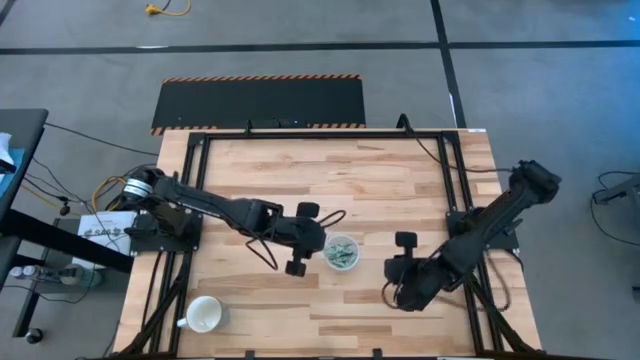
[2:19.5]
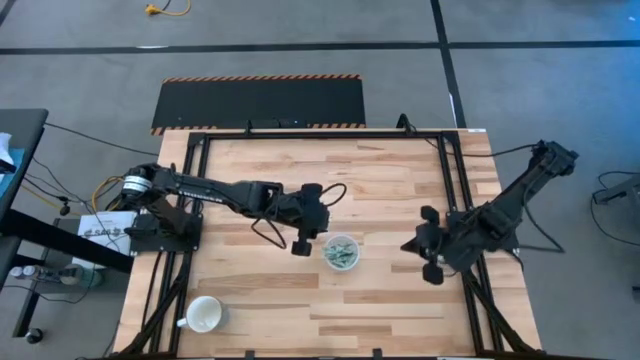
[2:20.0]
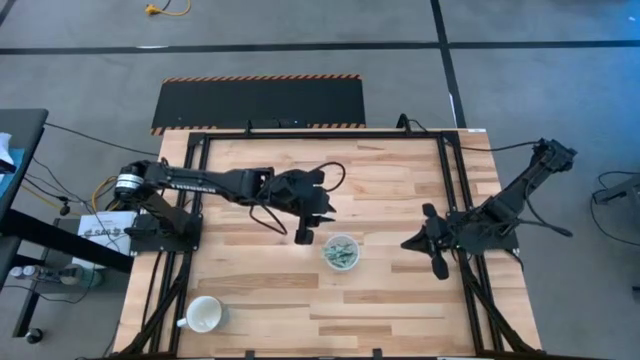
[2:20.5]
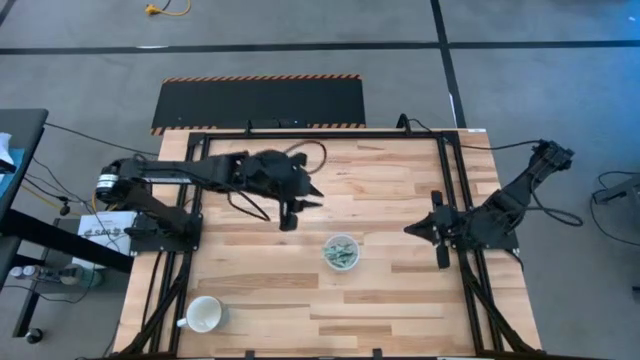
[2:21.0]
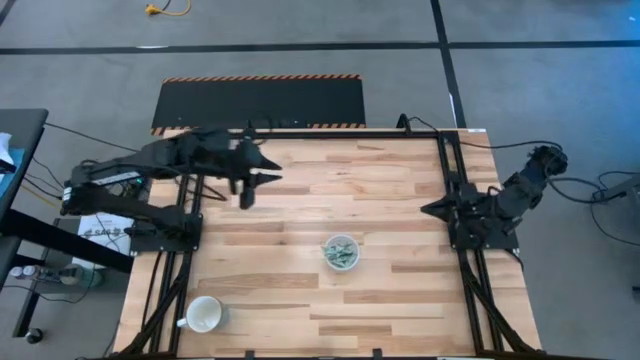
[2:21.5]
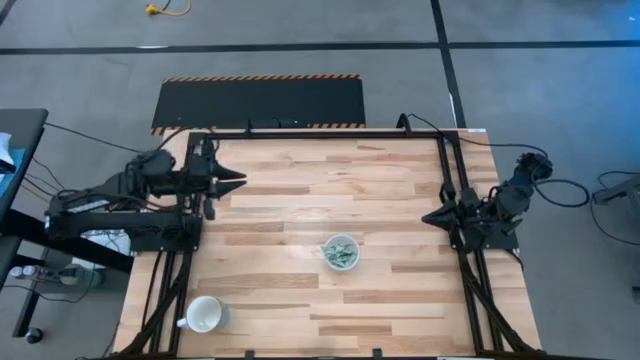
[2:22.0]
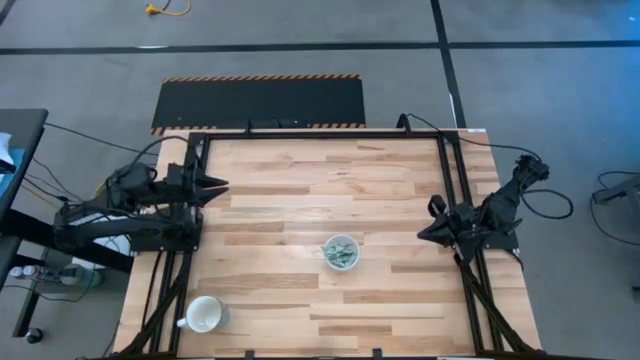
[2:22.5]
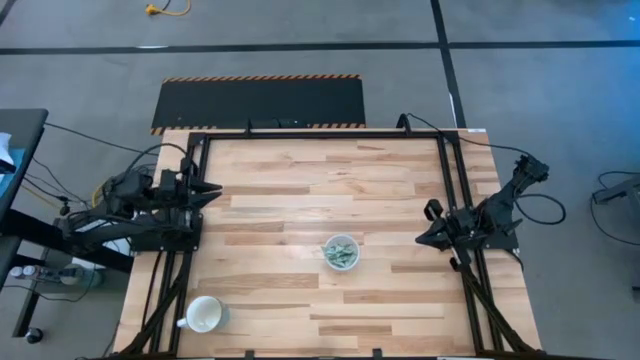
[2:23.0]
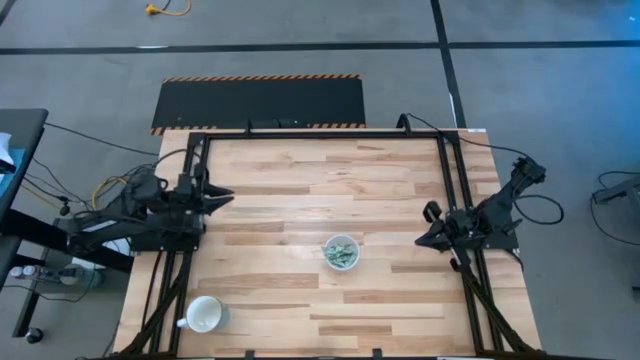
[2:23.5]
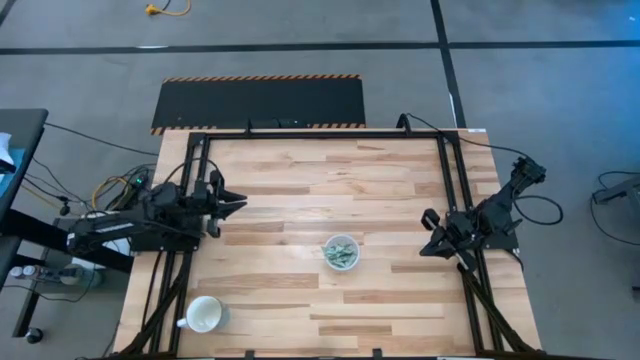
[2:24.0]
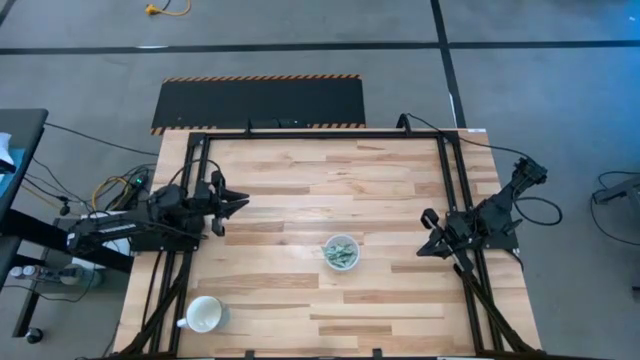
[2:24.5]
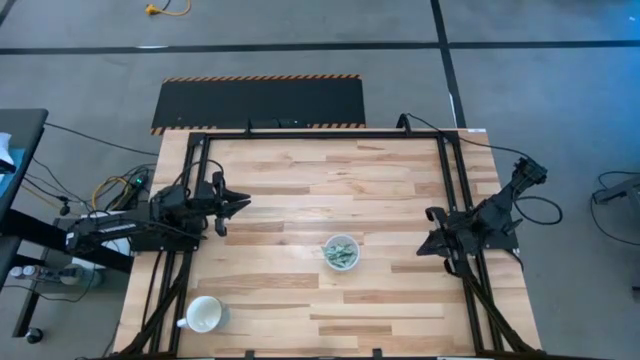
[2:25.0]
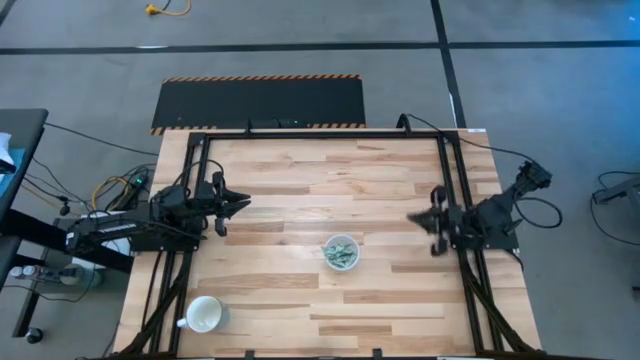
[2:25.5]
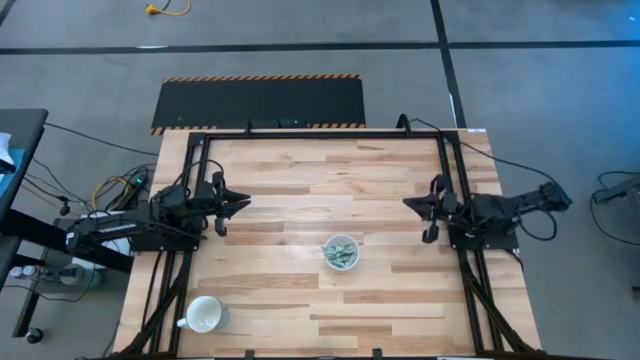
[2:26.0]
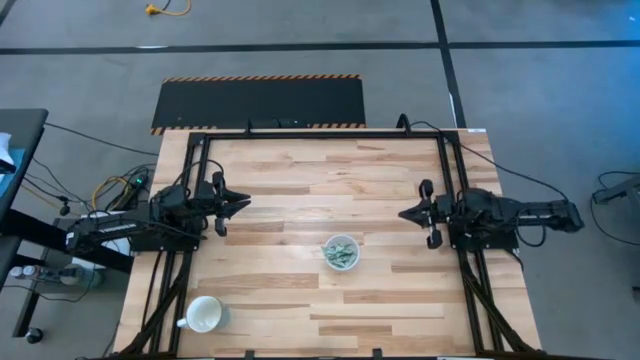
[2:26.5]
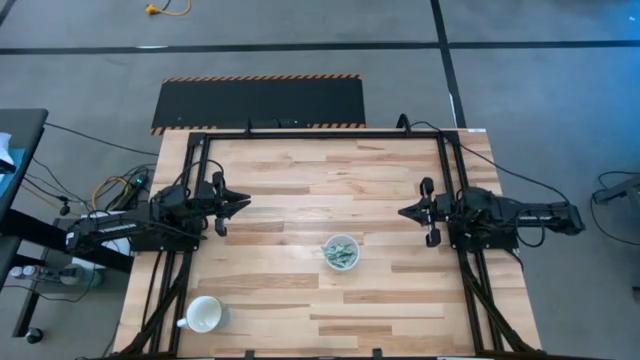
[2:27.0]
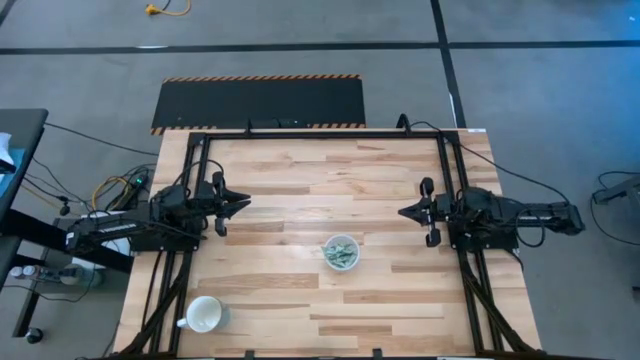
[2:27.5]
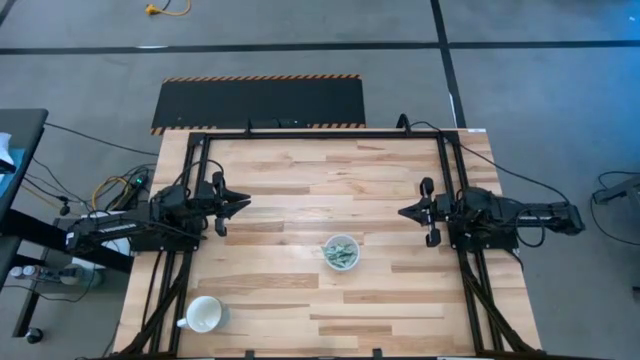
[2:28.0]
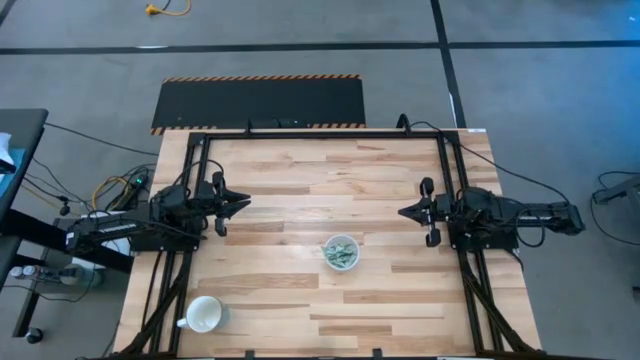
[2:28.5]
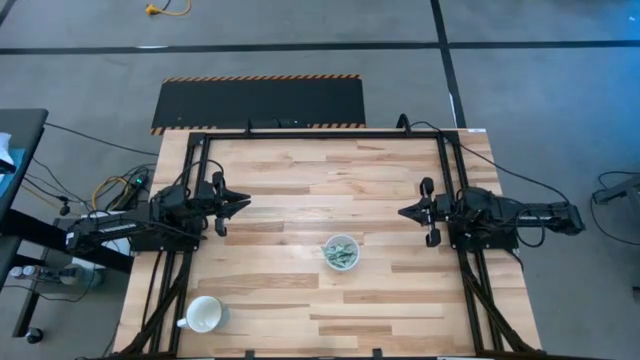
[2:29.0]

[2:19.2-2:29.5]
Task: Pick and place Stevia / Truvia into bins
Return to Home Position

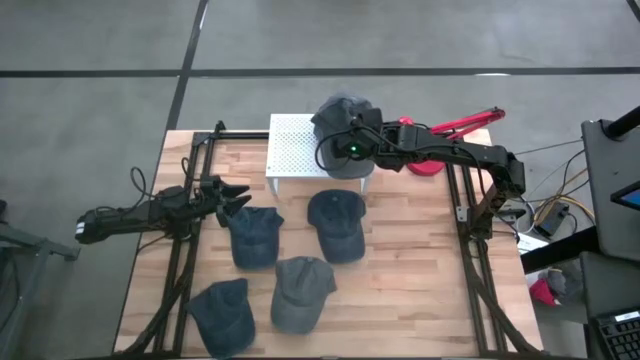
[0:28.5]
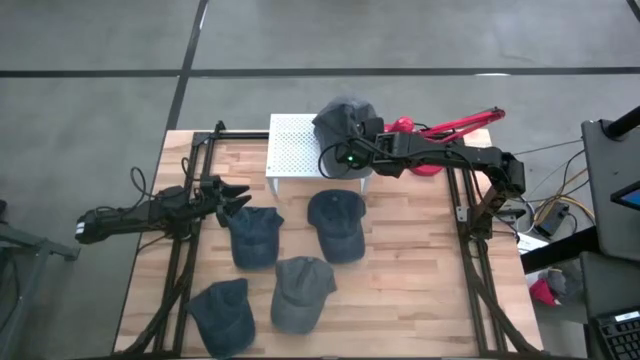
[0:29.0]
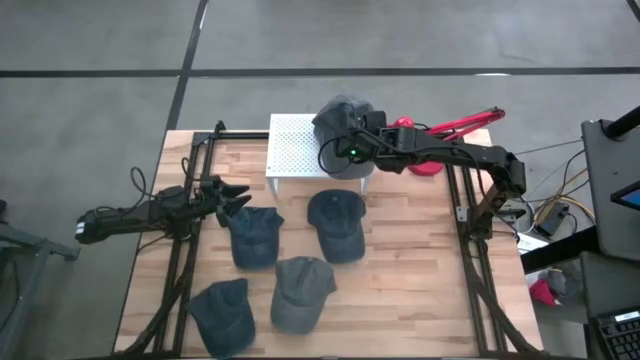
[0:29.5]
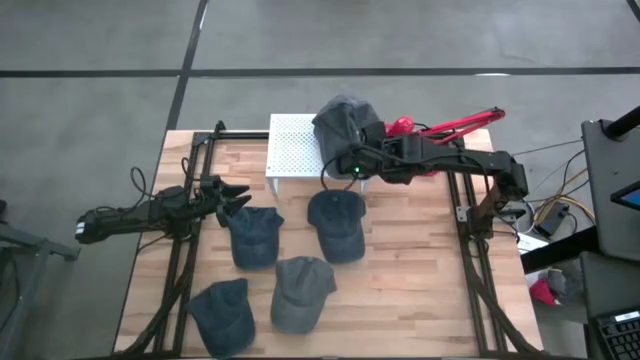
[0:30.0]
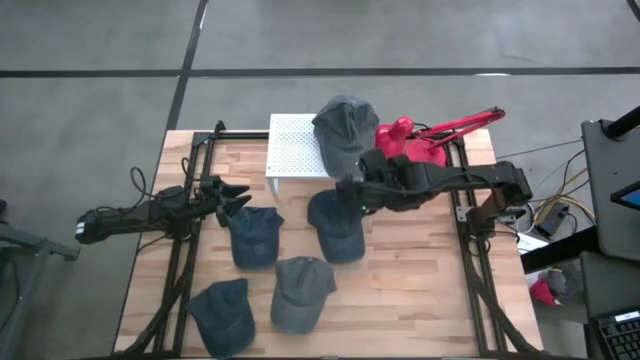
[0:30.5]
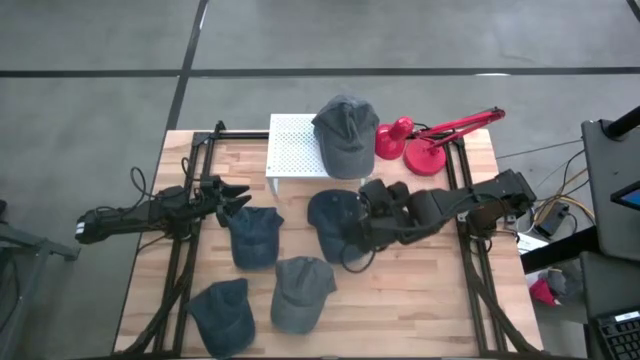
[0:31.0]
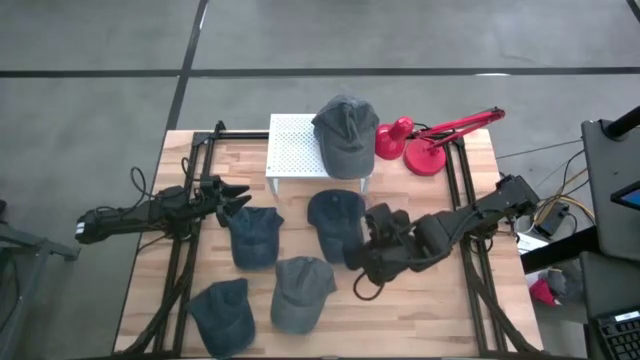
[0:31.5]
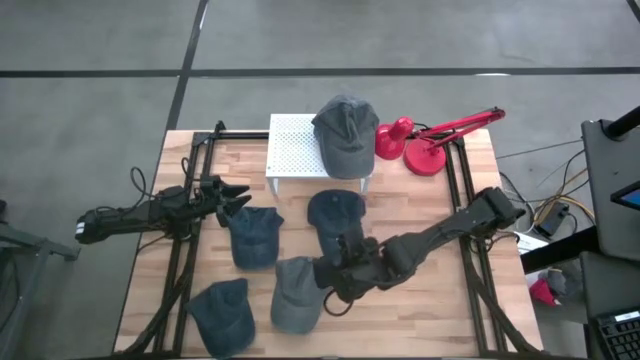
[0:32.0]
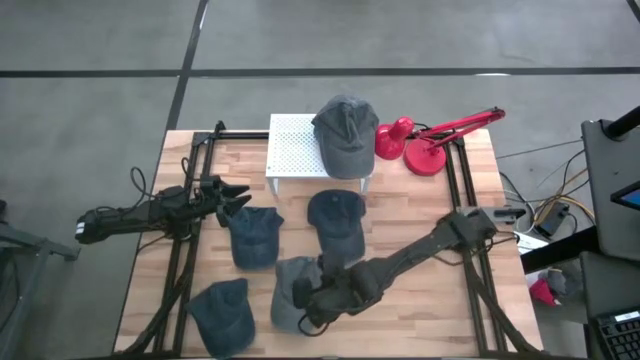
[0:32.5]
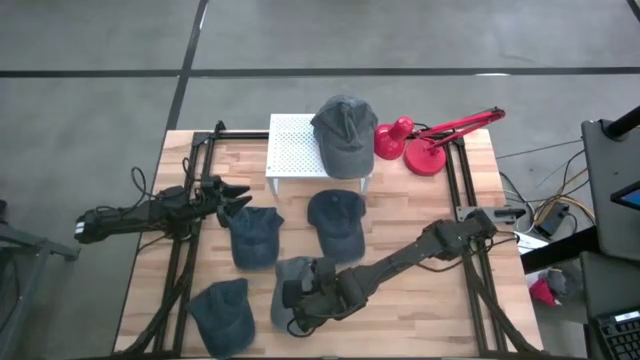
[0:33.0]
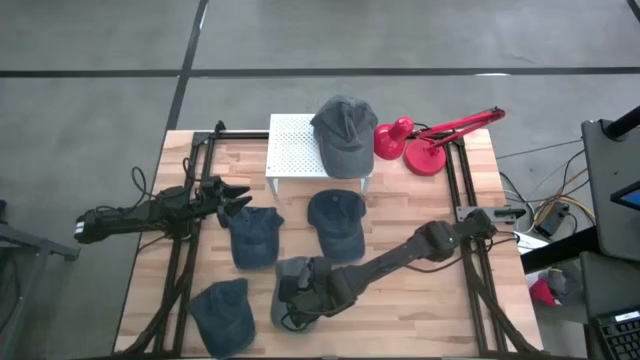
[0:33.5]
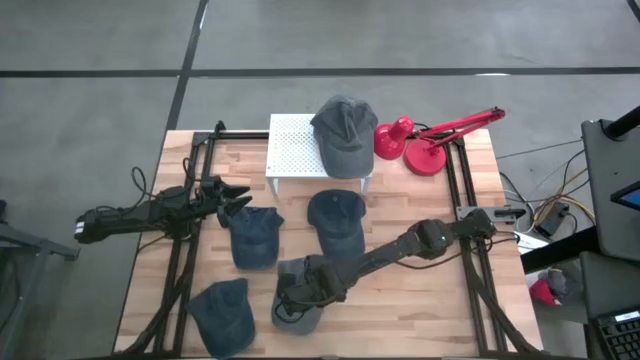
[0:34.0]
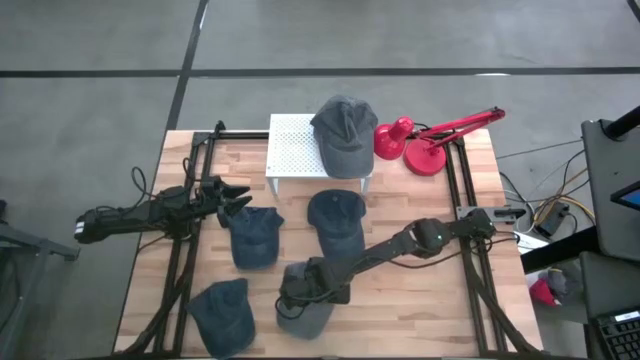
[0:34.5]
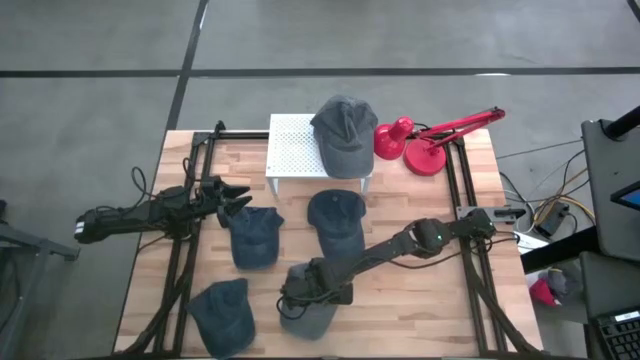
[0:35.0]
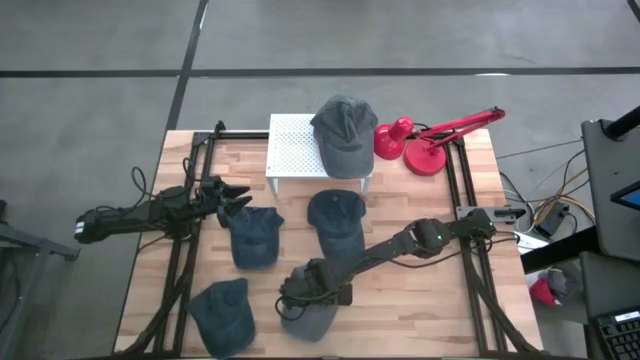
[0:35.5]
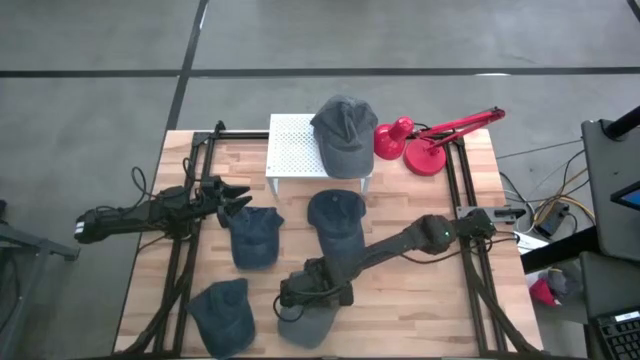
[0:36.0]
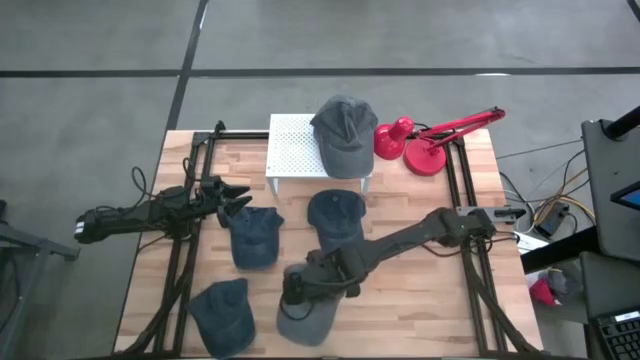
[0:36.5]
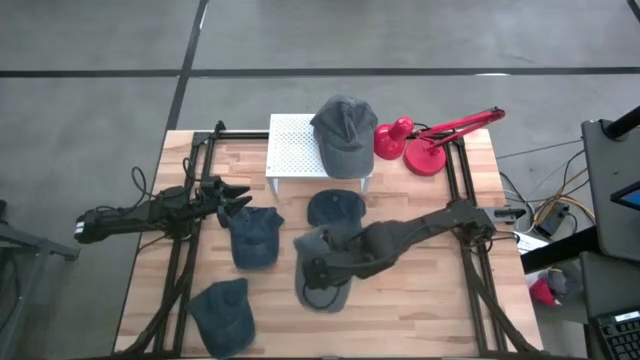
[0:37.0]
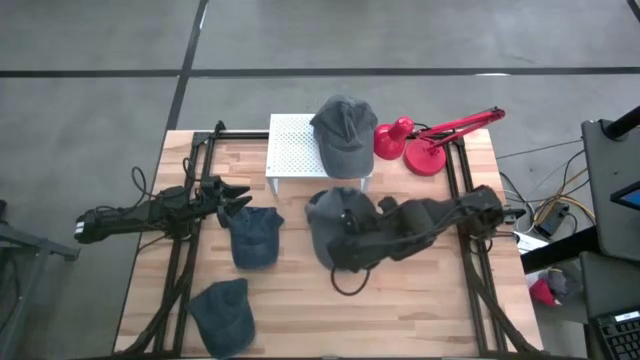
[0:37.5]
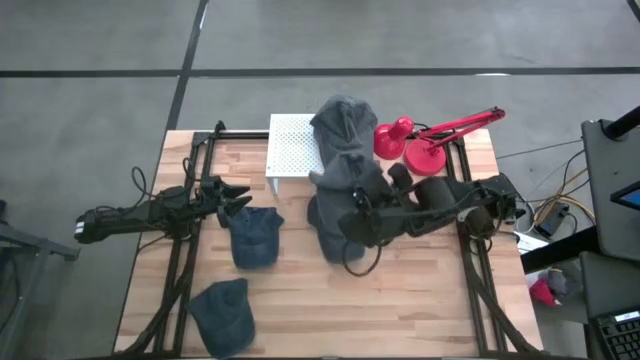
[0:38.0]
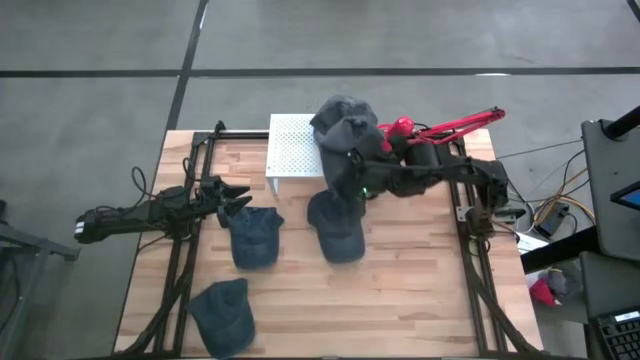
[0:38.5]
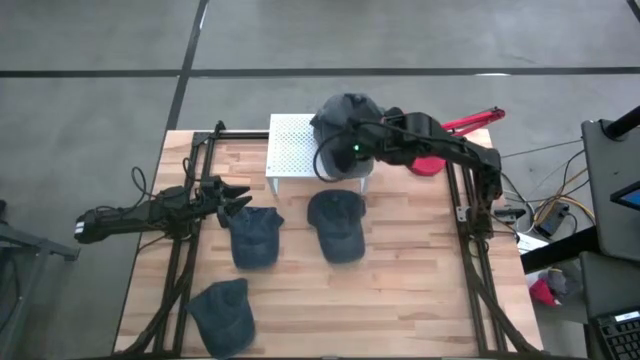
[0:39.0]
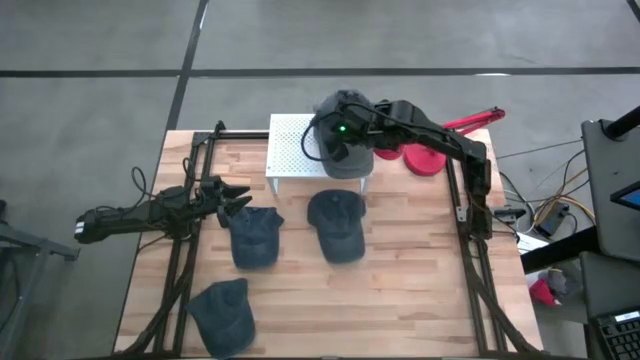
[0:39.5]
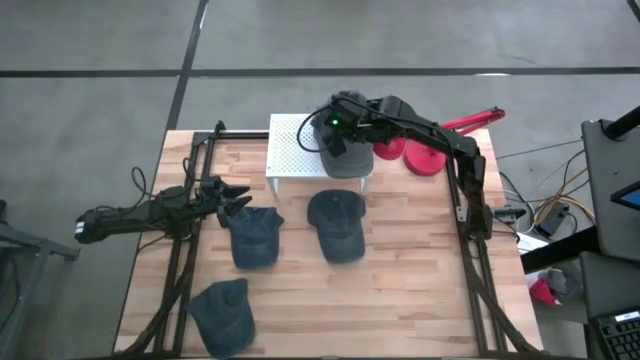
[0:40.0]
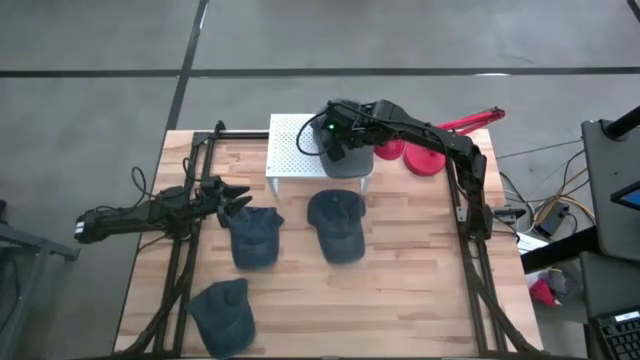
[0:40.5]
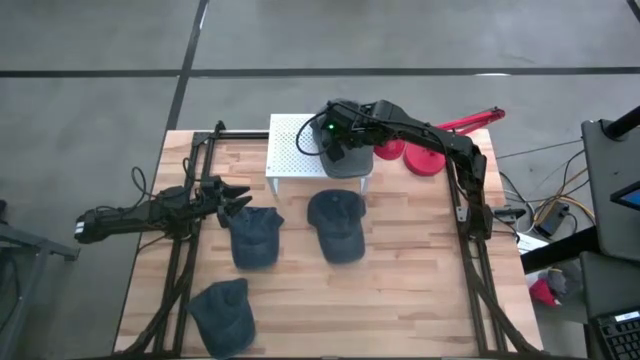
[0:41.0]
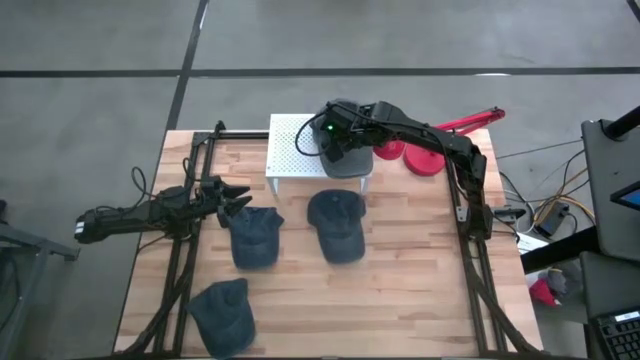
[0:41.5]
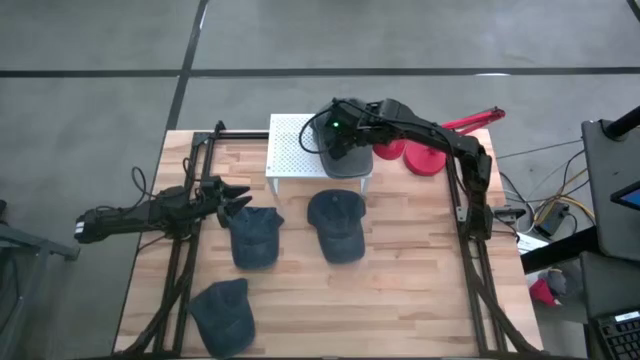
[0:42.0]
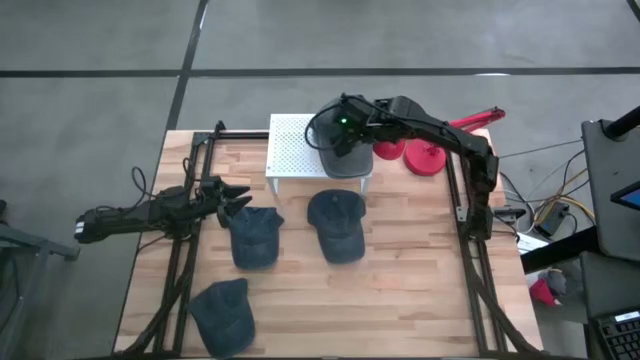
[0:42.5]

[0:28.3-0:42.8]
Task: Pick & Place hat
Put the gray cap on the shelf
